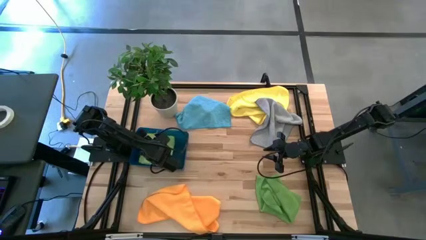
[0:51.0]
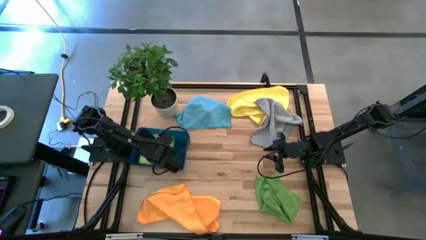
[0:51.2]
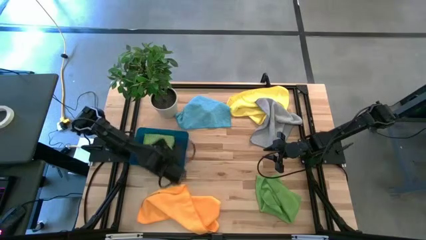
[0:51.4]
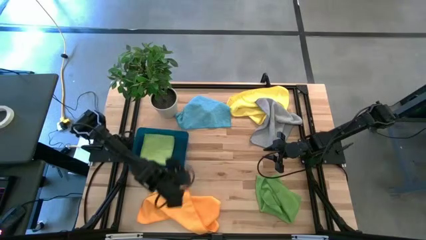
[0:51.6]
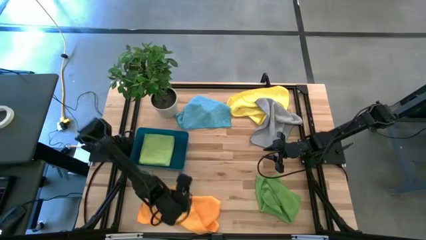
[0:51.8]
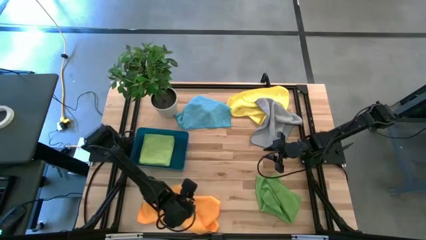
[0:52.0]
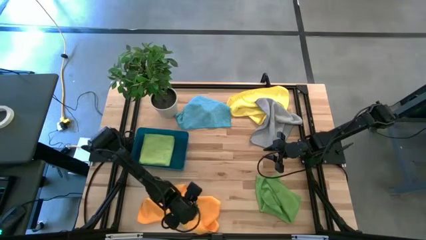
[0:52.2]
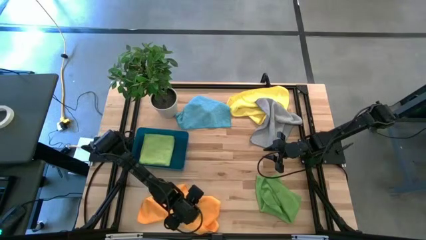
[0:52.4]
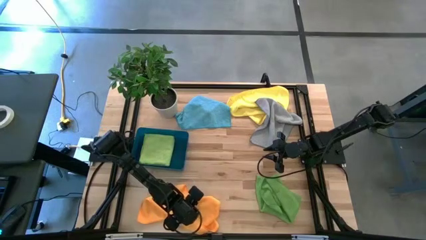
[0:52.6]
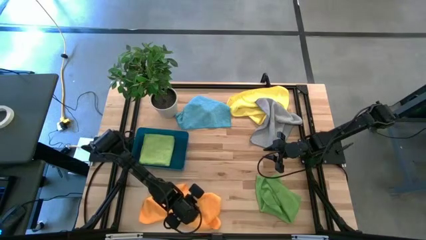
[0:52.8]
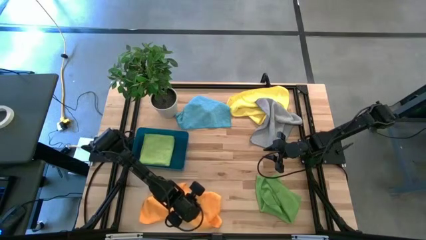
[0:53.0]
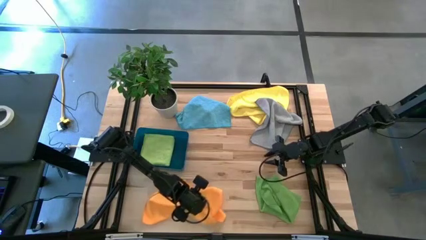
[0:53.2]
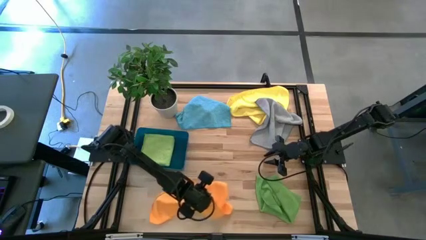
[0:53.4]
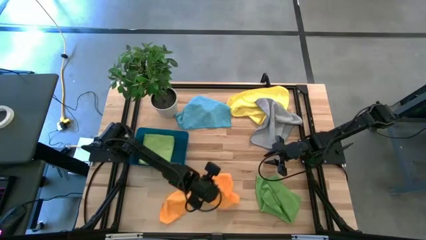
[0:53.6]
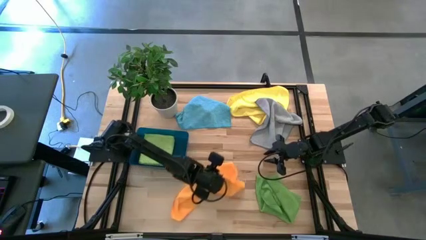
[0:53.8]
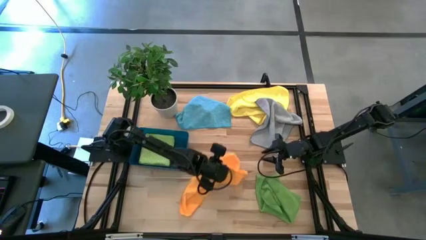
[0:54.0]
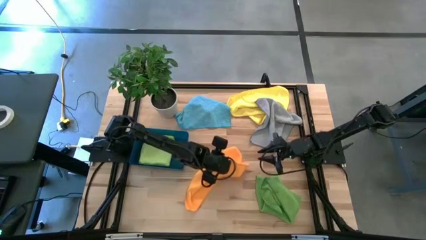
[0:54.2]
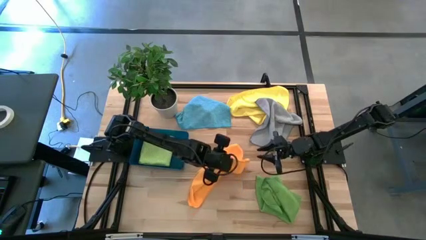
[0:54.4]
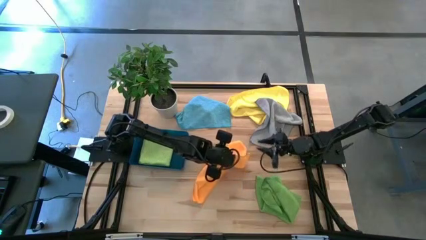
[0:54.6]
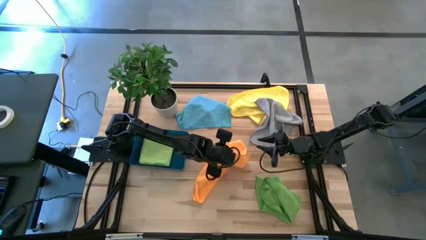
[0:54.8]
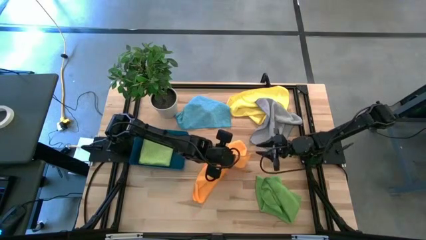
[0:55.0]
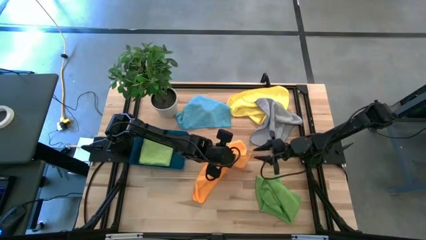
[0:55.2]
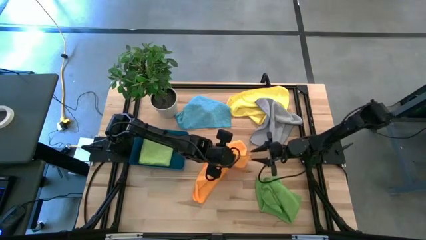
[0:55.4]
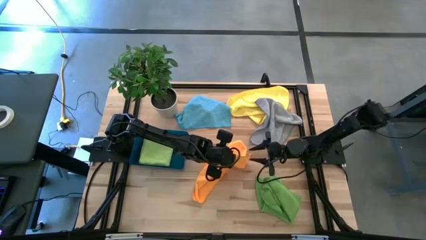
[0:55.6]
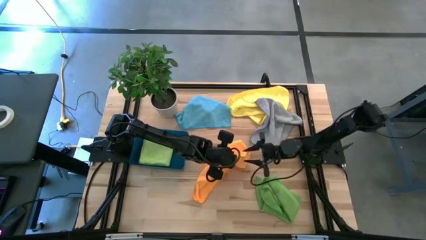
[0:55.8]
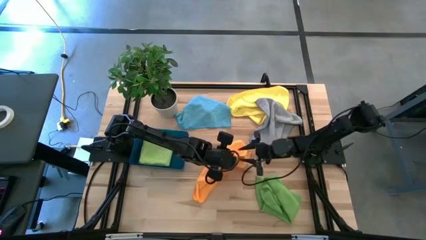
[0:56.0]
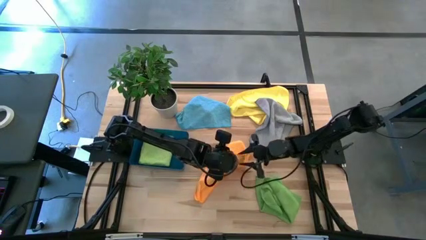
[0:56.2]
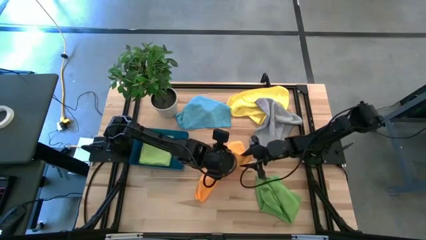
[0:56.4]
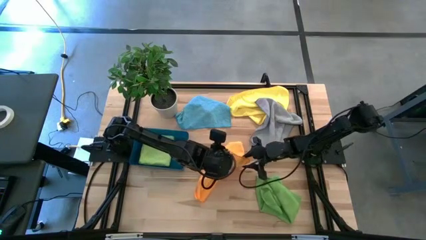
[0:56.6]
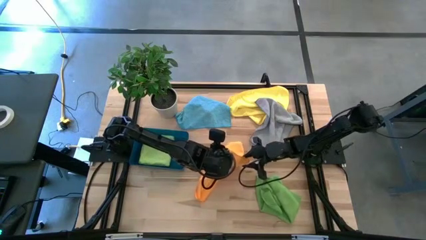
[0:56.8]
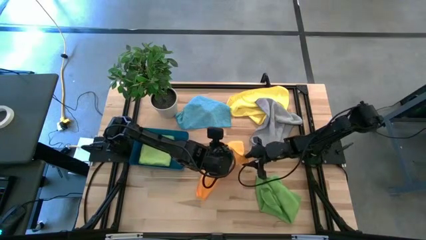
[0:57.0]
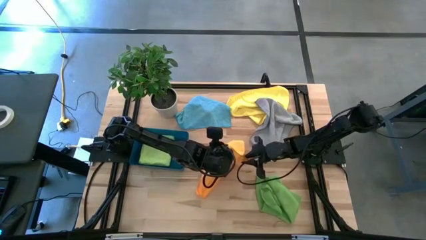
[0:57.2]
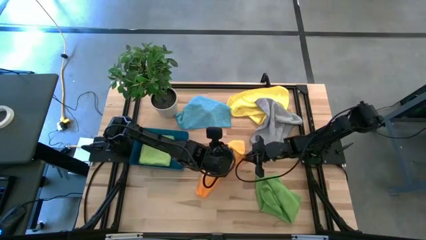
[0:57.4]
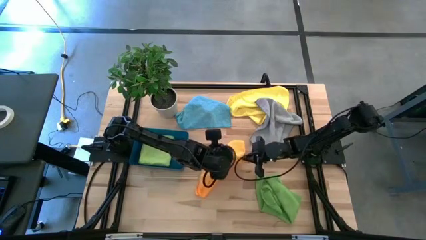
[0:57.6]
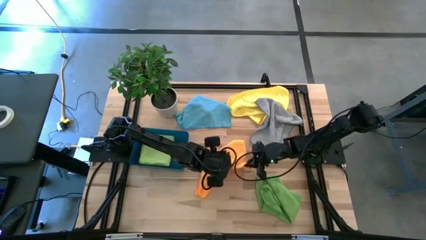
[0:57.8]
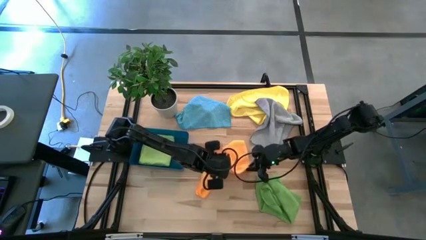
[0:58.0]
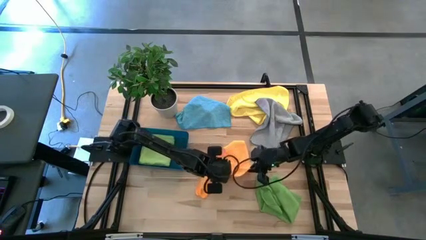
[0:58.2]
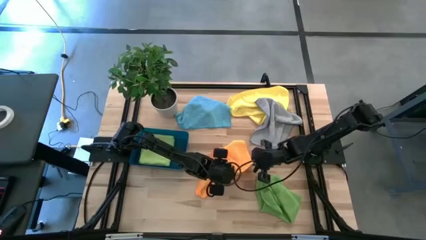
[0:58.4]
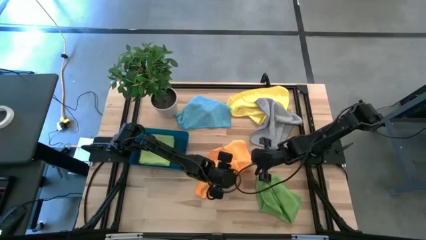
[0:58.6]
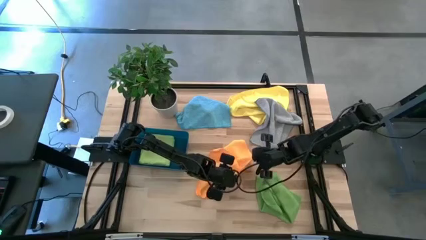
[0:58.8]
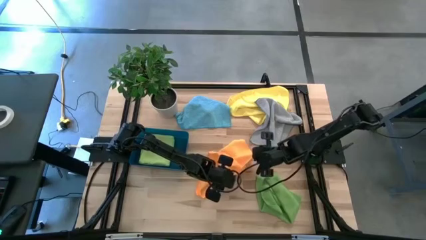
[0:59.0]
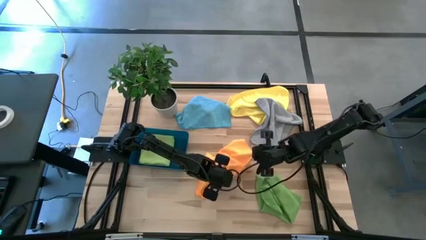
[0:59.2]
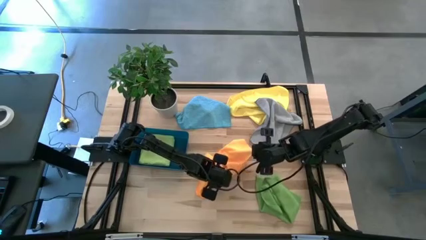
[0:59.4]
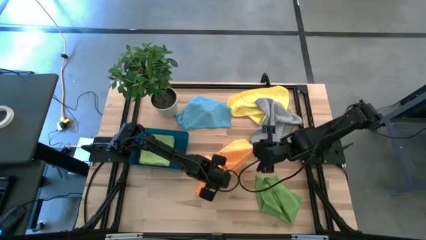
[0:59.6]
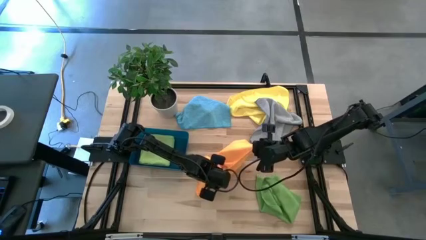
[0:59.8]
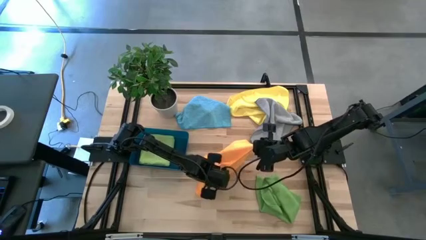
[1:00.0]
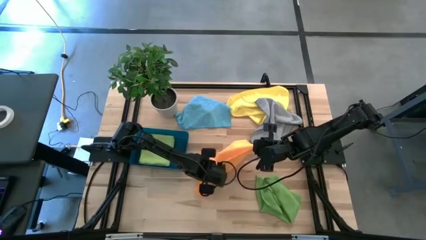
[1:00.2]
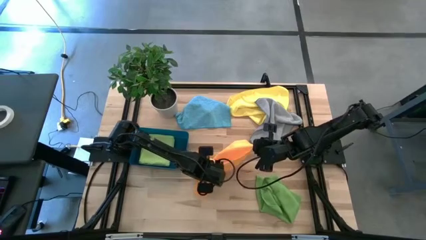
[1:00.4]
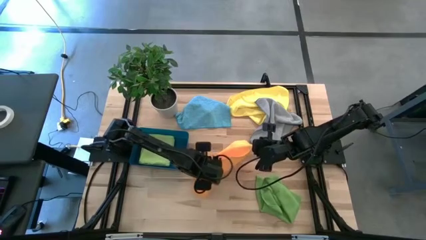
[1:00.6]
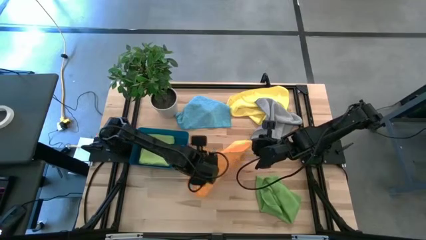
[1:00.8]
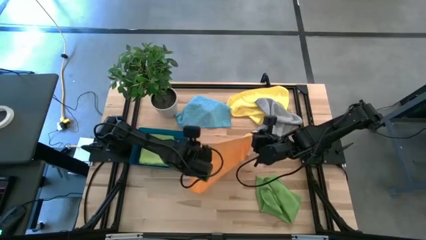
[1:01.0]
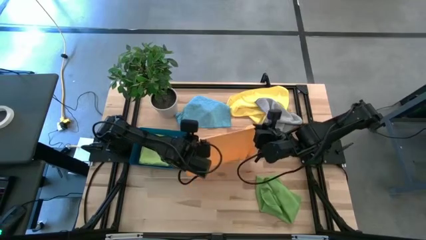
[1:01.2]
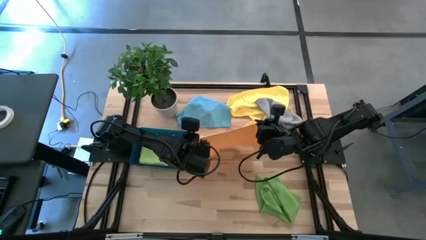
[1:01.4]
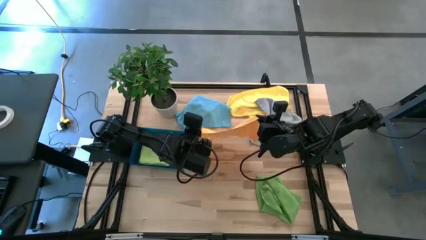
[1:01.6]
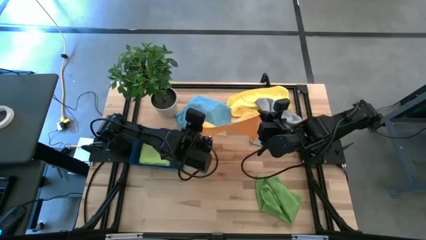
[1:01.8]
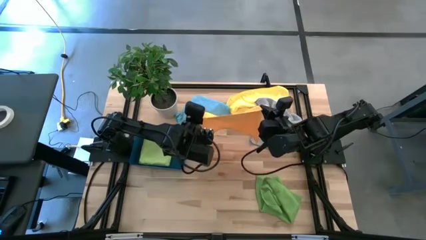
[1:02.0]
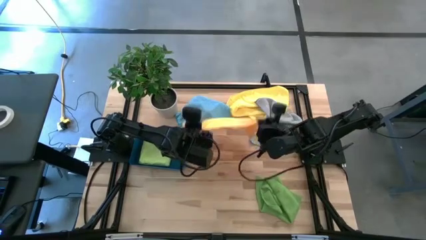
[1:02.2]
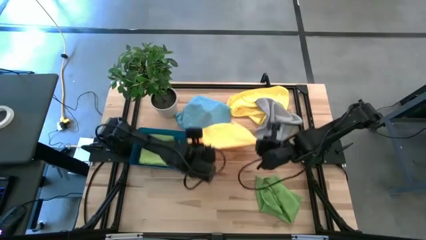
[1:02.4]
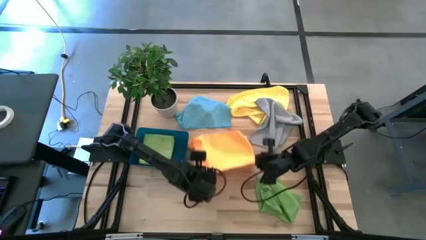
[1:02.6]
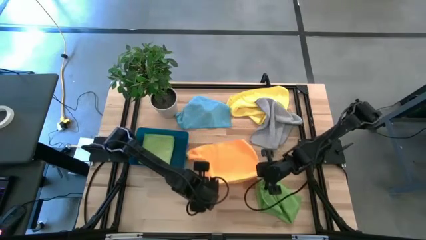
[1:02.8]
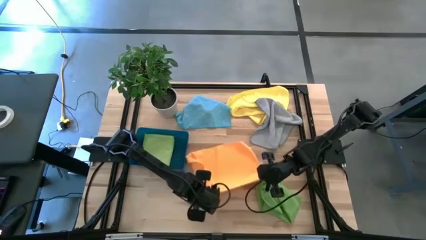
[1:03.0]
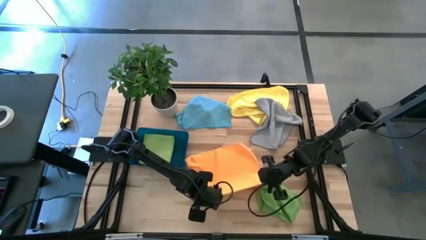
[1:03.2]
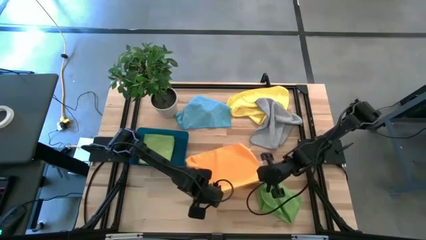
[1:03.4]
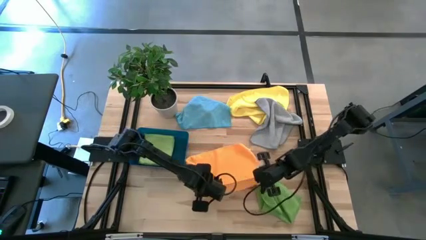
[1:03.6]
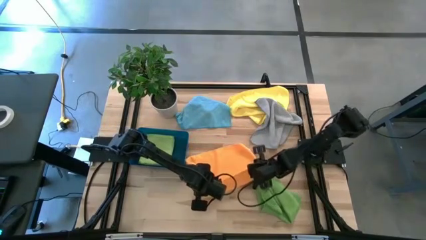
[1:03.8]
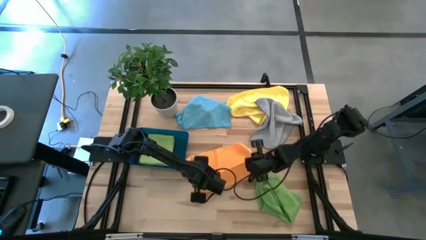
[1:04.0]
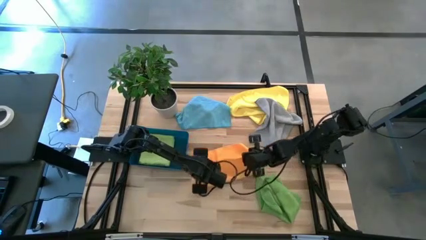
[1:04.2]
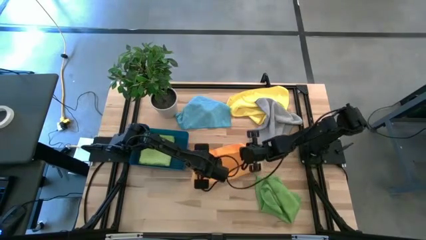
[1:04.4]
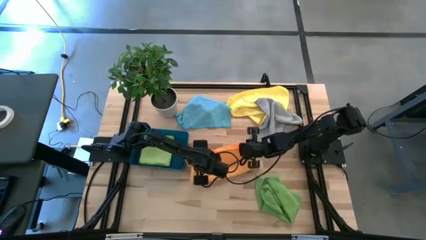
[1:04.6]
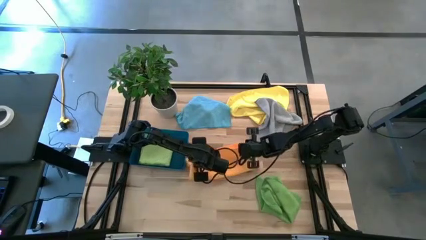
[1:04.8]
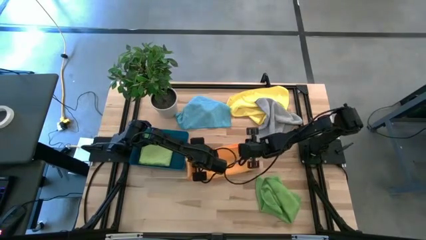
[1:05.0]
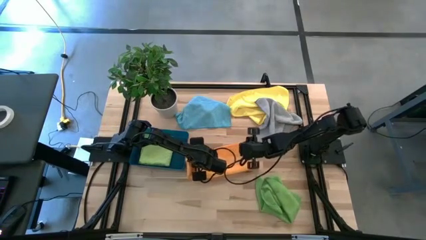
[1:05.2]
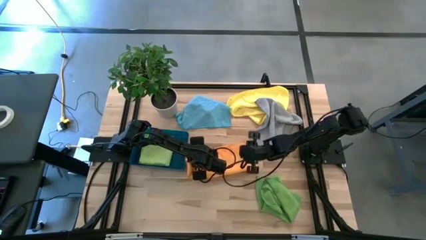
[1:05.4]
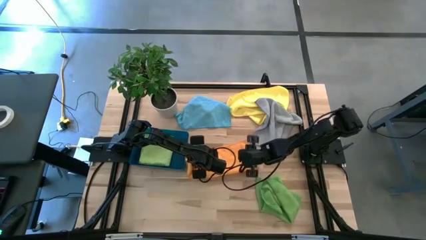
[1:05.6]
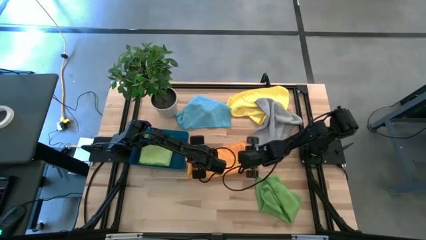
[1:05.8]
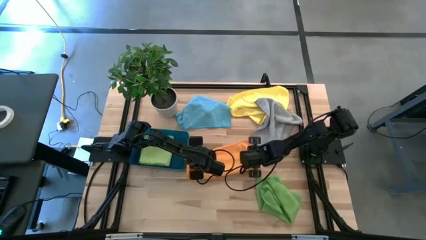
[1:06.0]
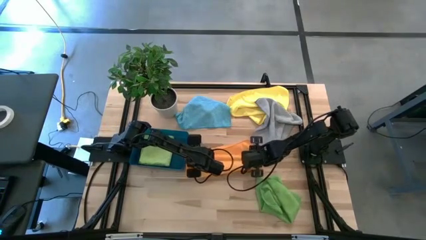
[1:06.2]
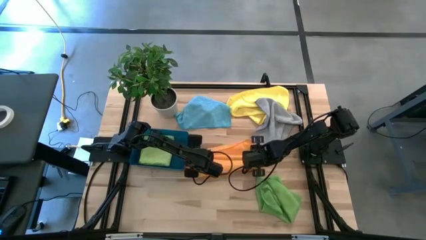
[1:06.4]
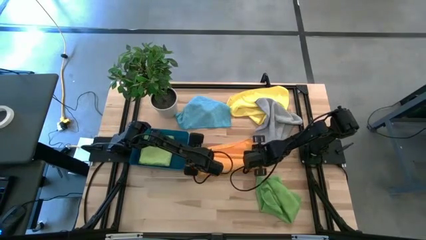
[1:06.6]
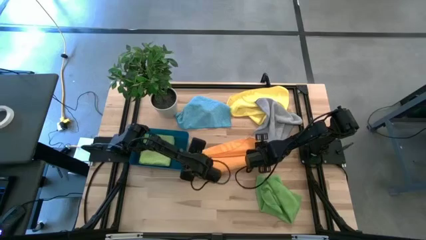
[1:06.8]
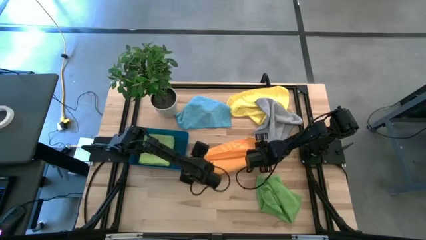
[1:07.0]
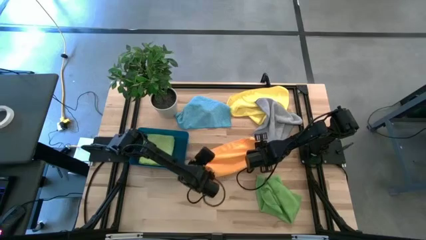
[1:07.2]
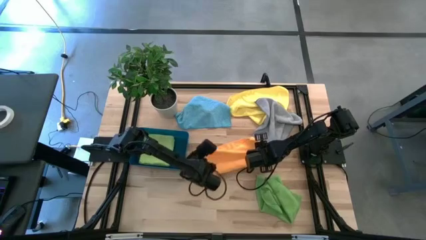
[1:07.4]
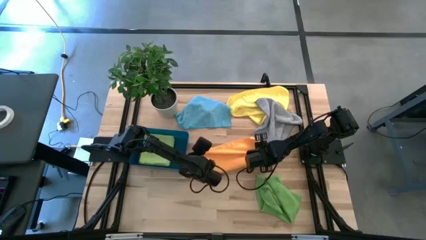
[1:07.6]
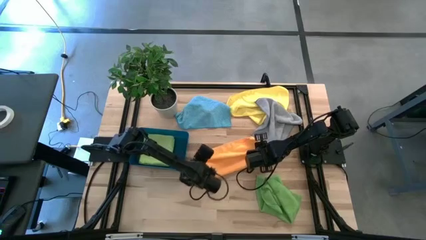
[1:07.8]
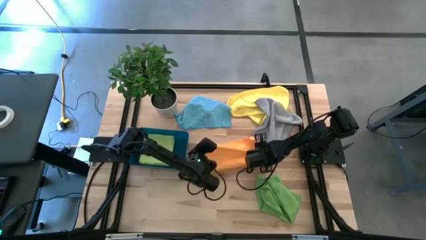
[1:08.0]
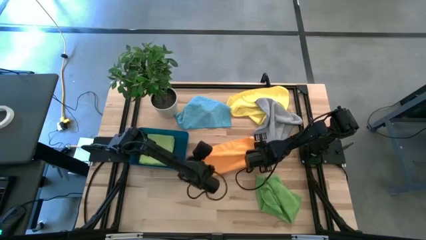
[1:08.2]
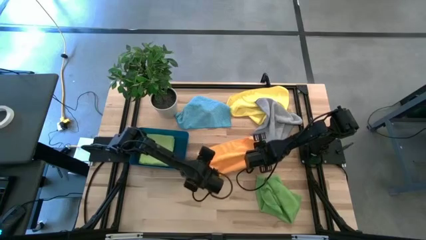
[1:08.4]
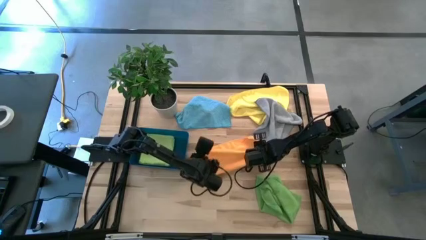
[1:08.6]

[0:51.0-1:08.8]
Task: Fold microfiber towels
Fold the orange microfiber towel on the table
